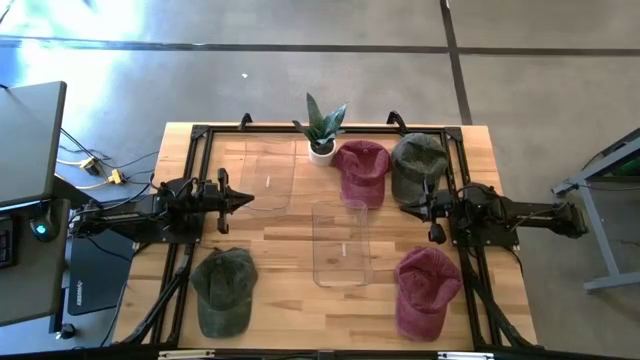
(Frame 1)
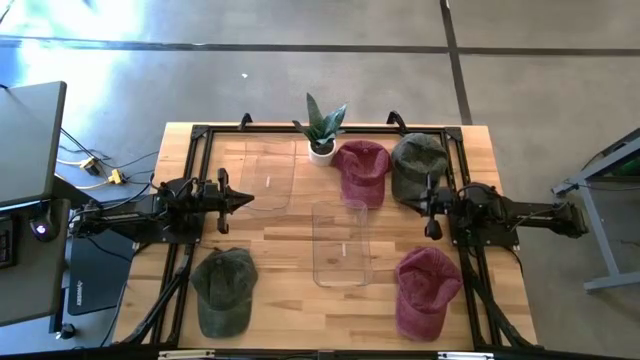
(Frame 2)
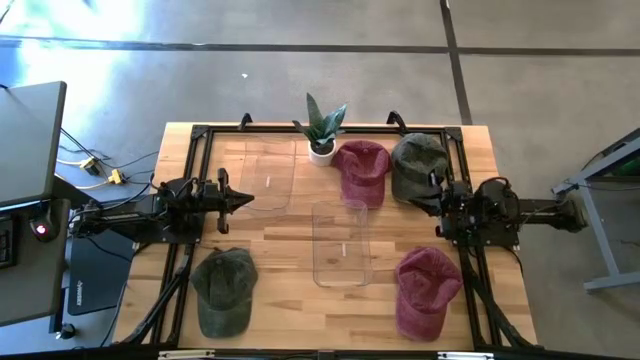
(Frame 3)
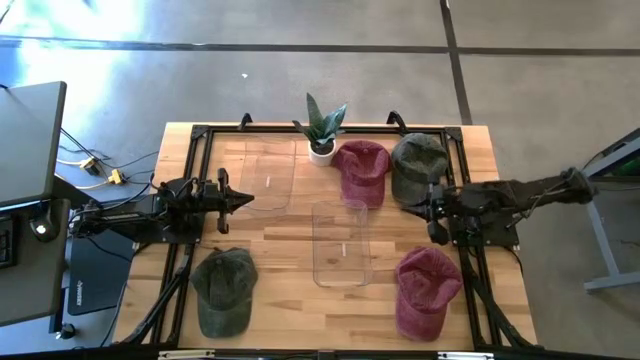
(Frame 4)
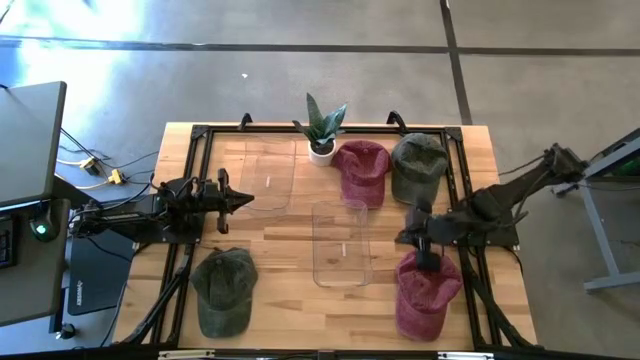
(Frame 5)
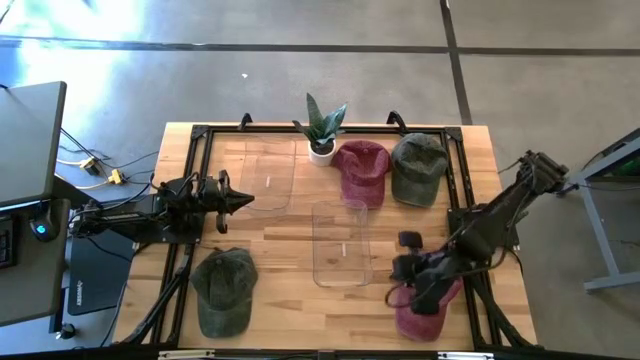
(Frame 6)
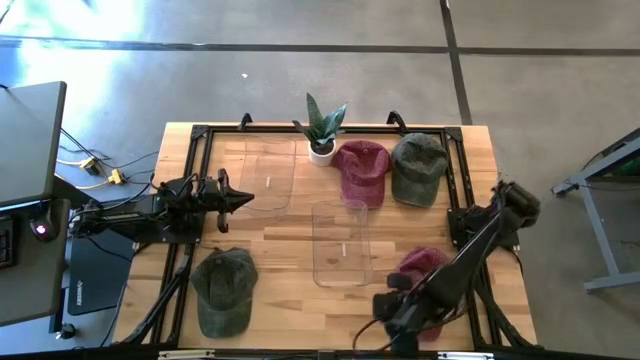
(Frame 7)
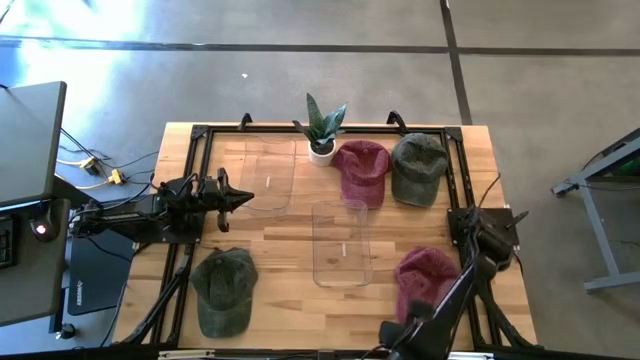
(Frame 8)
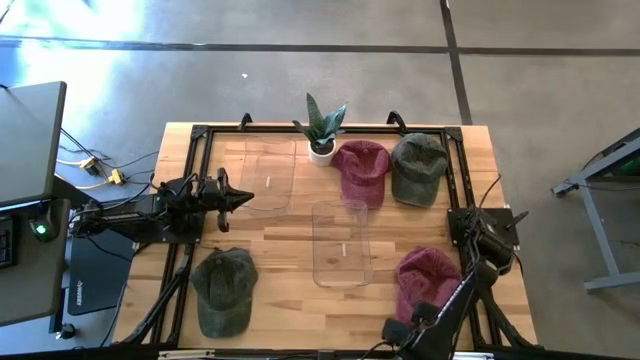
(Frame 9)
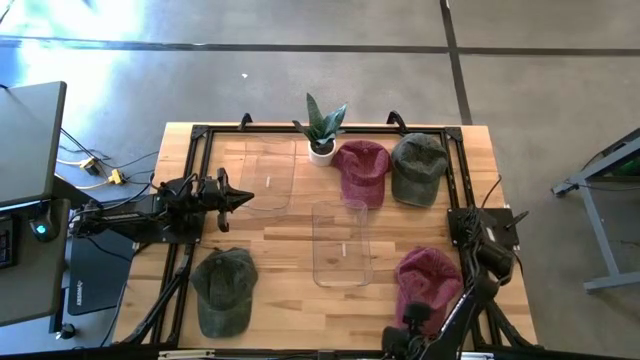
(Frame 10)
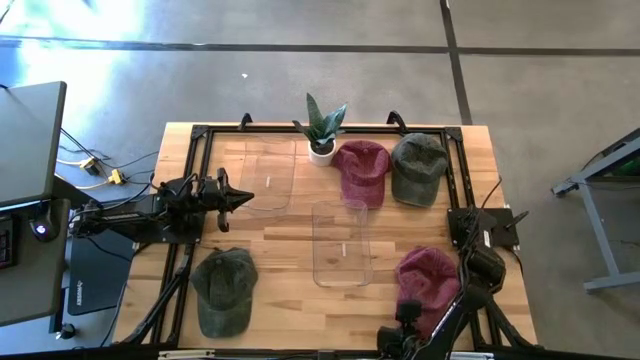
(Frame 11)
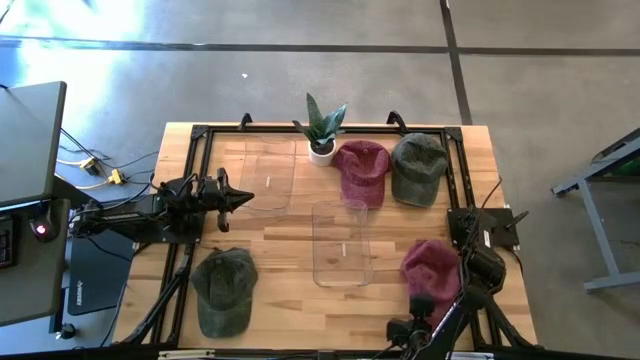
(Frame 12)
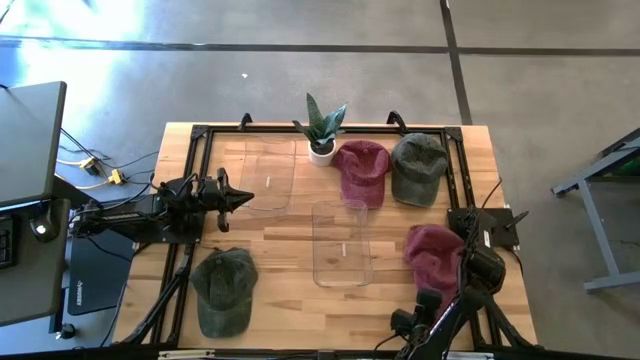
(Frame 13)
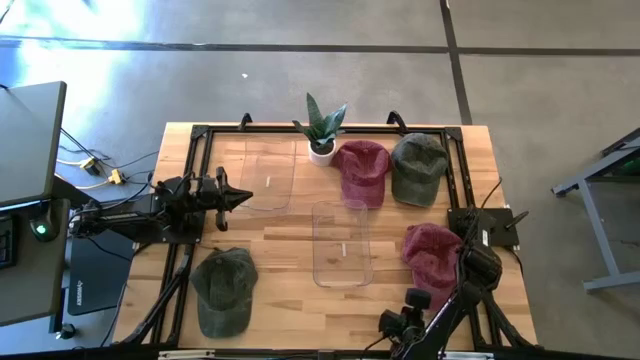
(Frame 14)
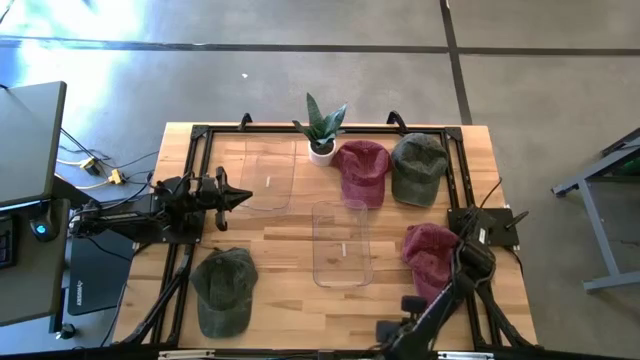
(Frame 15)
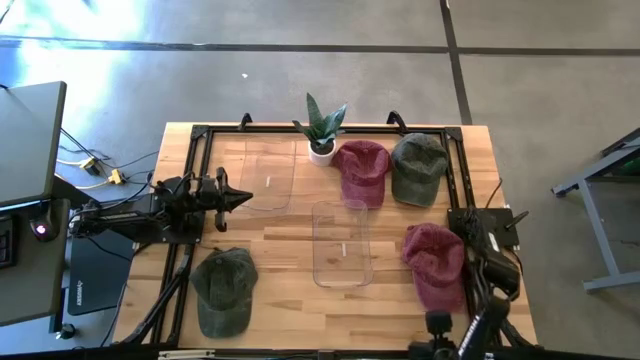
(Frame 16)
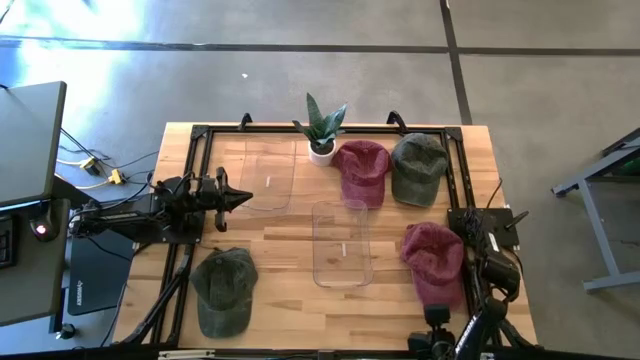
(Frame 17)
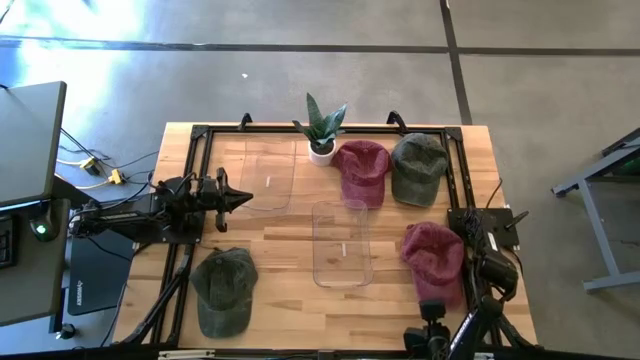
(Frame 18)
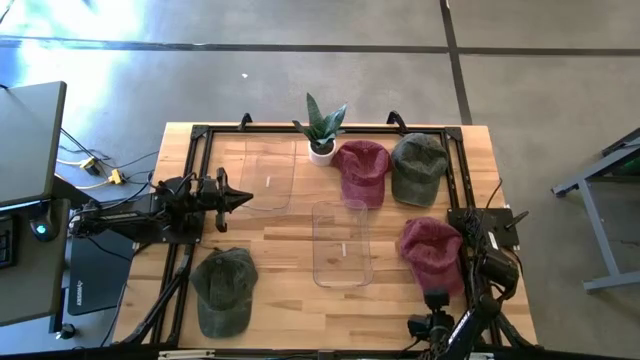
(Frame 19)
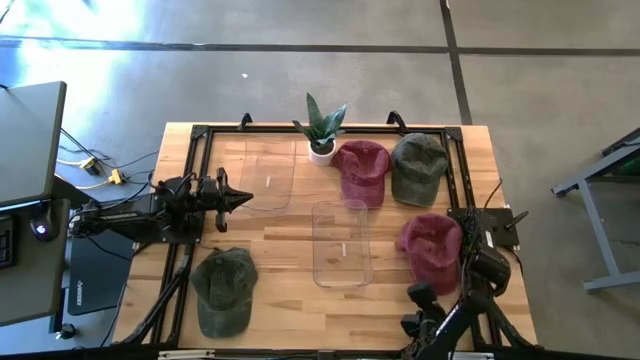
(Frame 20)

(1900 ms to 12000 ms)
Task: Pick & Place hat
Put the bottom red cap into the bottom transparent bin

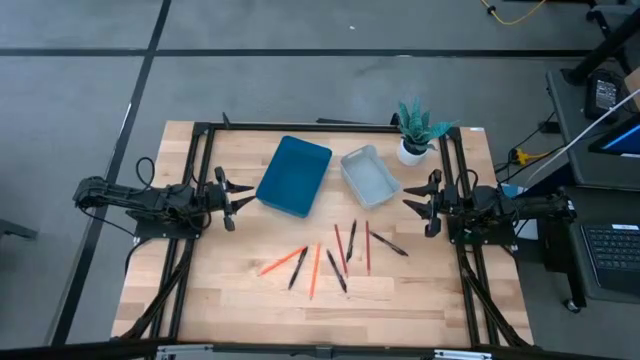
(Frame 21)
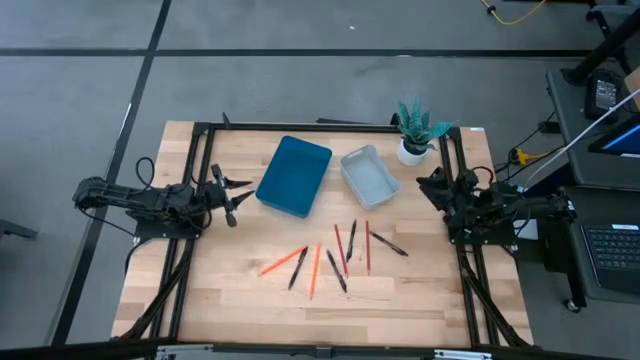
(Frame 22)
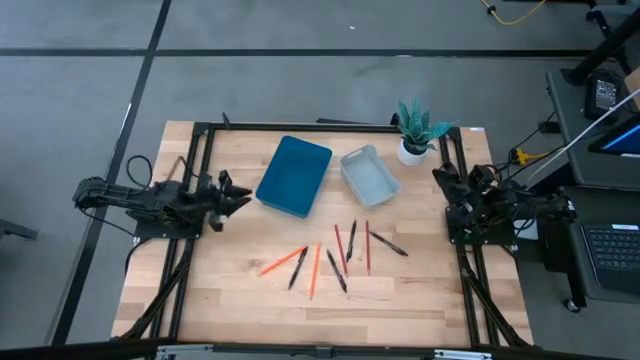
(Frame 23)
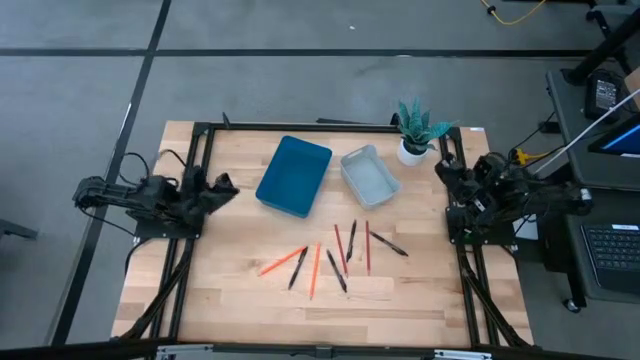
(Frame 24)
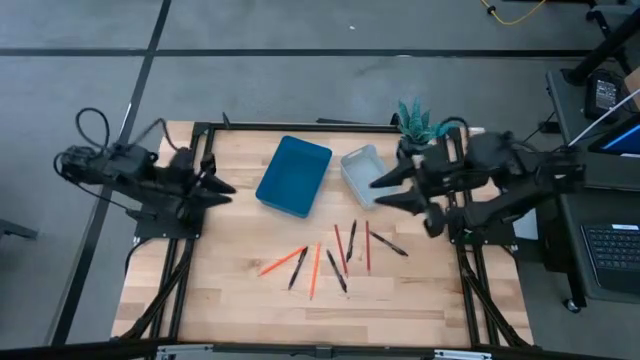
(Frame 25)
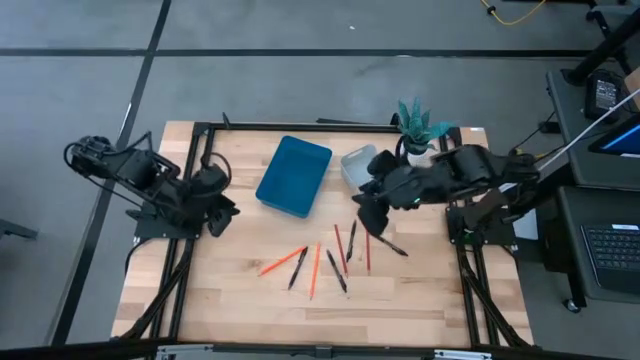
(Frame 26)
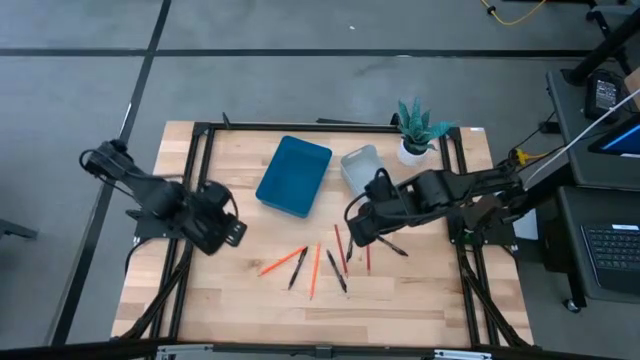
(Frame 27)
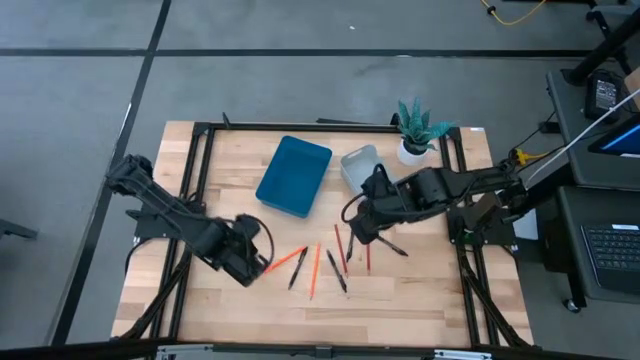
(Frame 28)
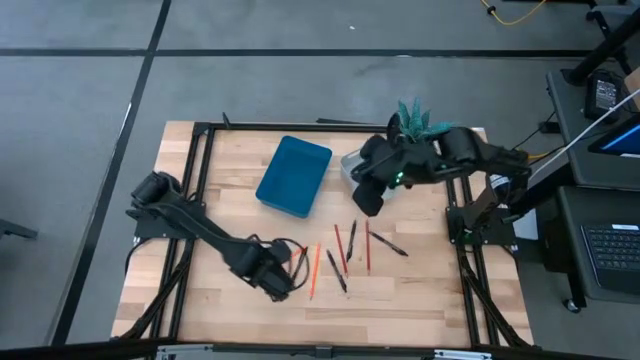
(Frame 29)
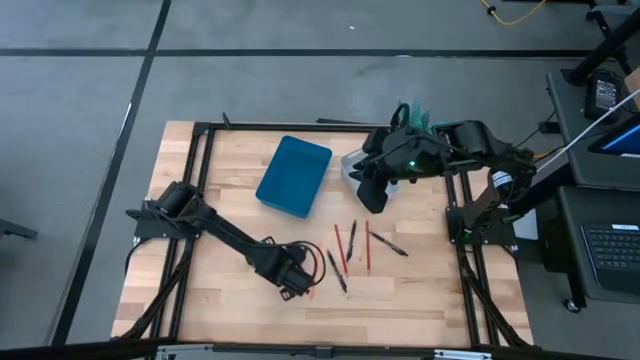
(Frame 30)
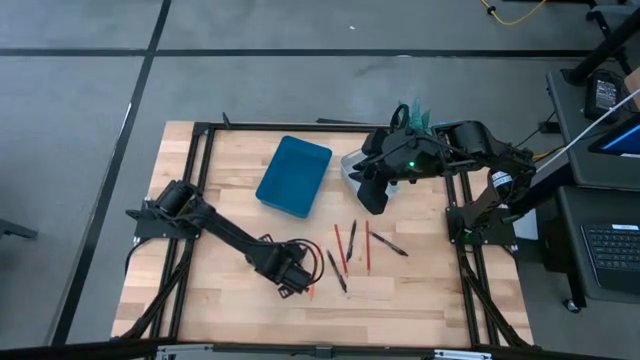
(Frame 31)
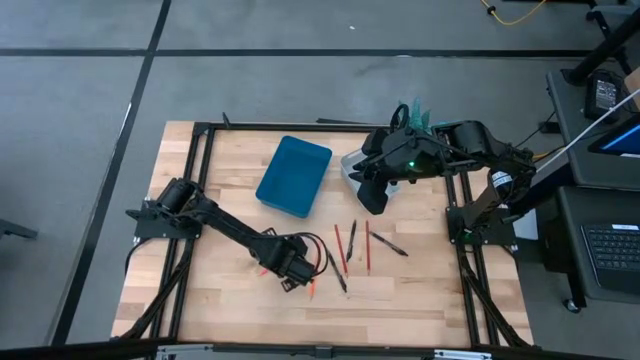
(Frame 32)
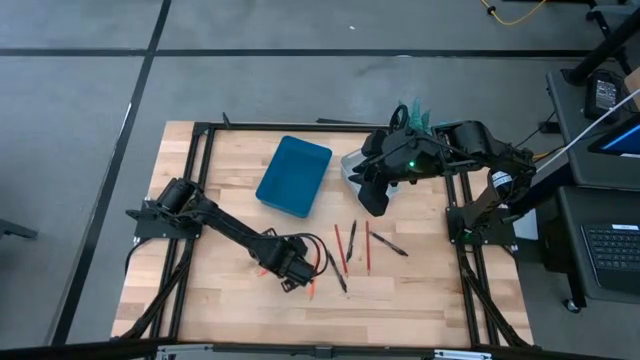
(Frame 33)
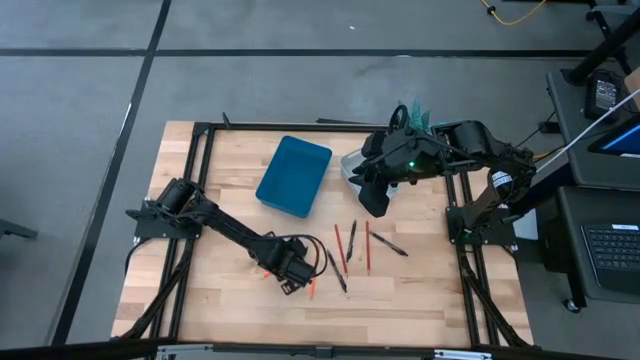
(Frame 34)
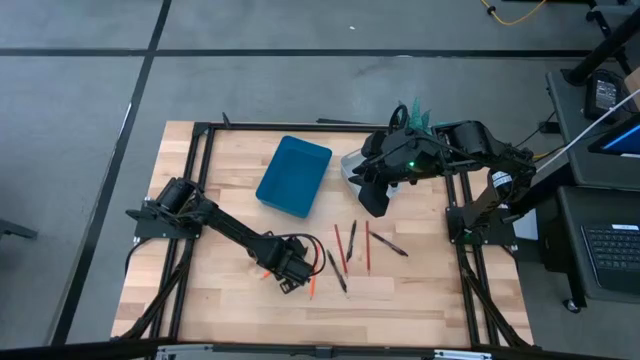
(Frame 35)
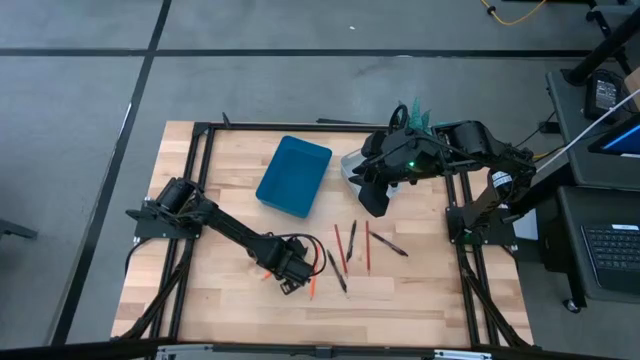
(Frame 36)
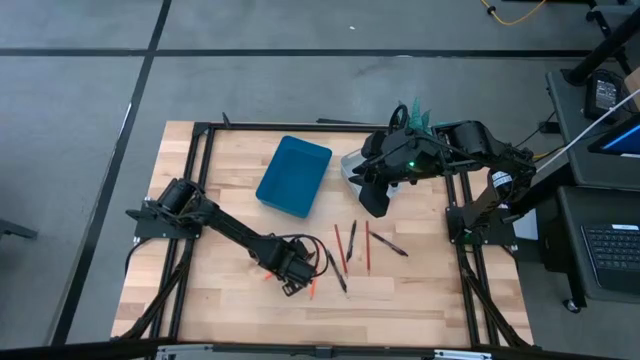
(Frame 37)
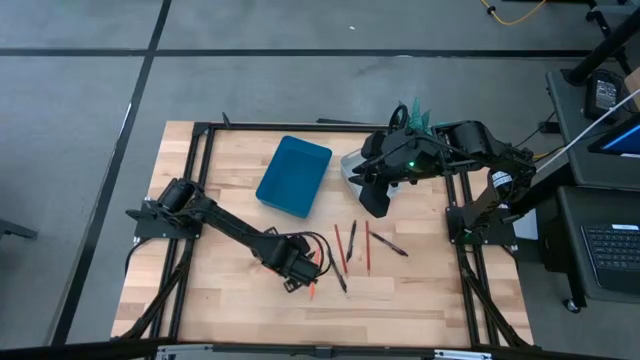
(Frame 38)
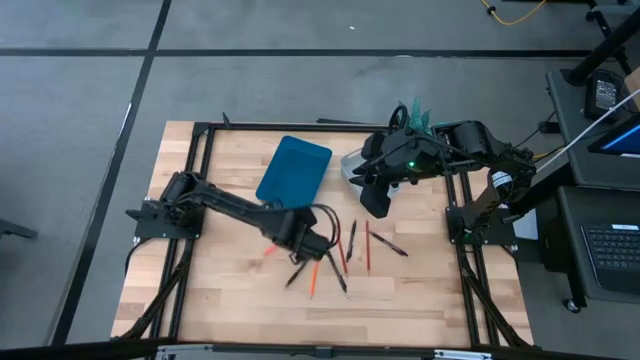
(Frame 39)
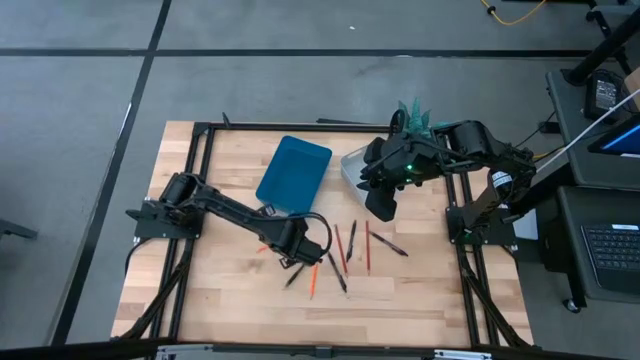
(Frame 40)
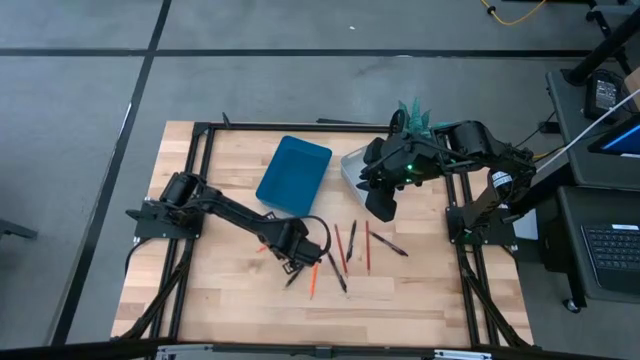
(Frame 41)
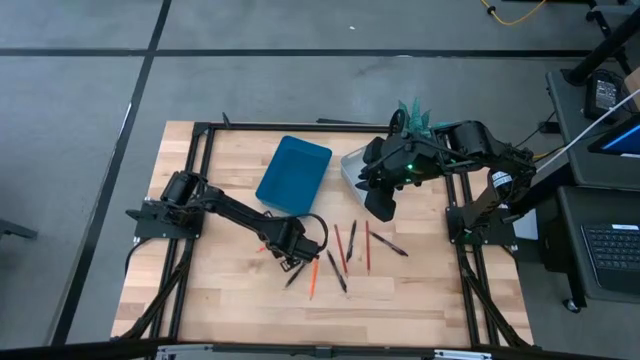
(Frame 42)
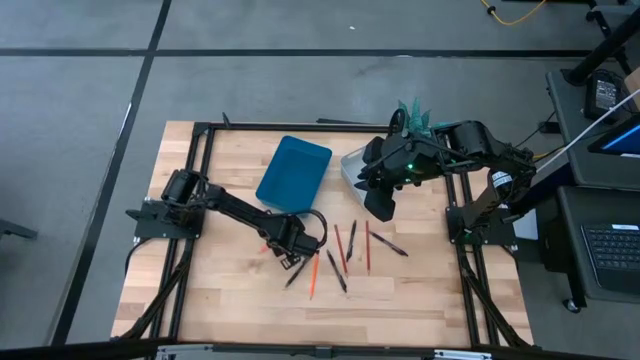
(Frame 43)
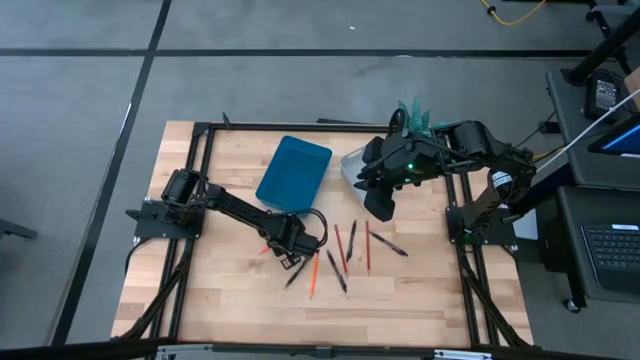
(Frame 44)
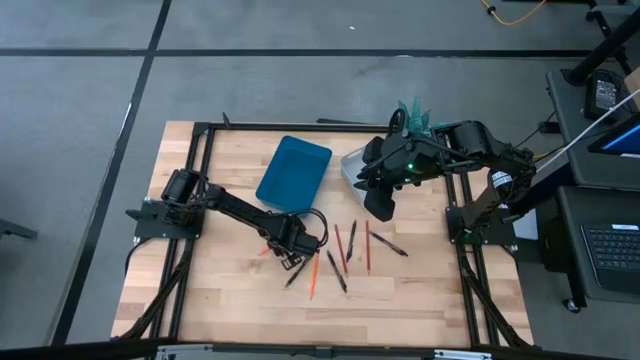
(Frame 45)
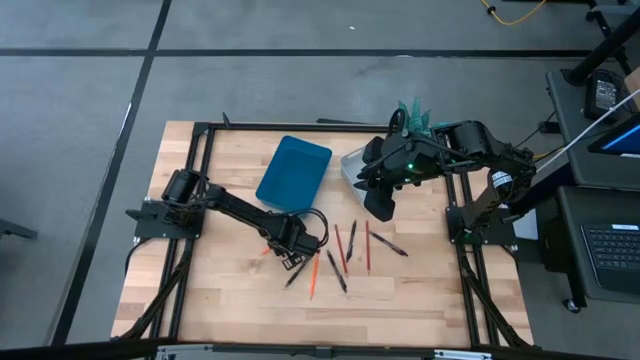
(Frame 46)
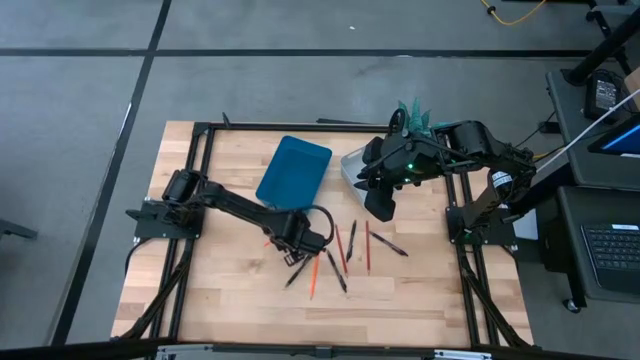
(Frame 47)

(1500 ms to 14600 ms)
Task: Sort pens & pencils
Put the orange pencil into the blue bin
